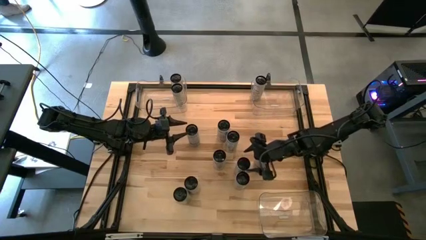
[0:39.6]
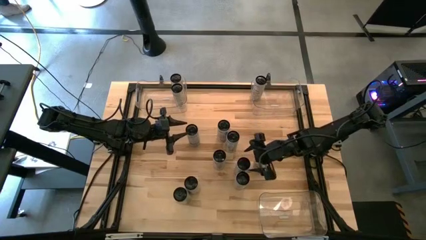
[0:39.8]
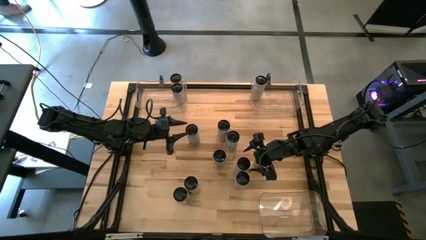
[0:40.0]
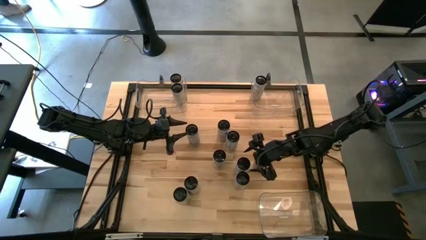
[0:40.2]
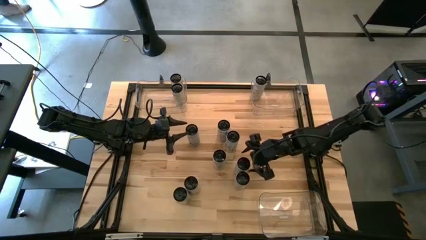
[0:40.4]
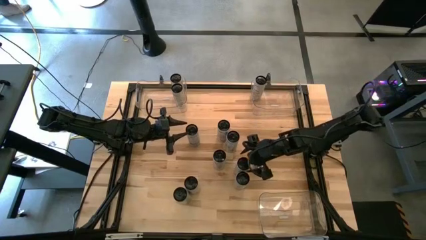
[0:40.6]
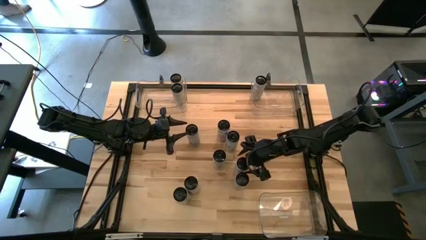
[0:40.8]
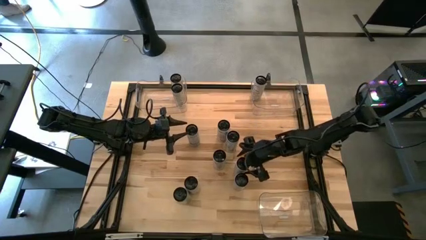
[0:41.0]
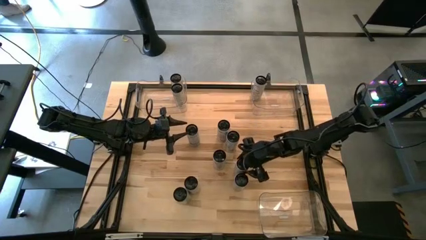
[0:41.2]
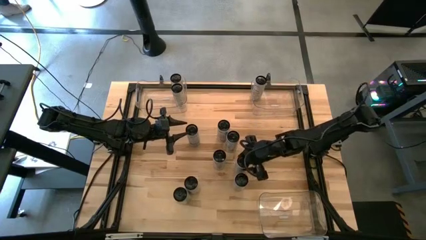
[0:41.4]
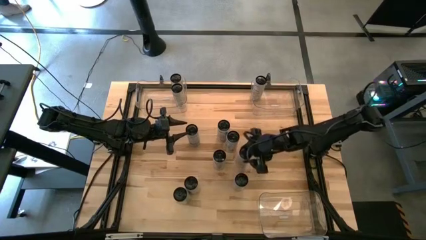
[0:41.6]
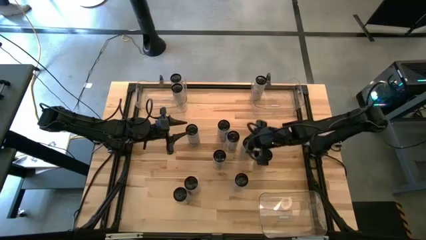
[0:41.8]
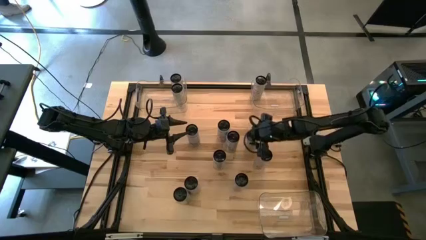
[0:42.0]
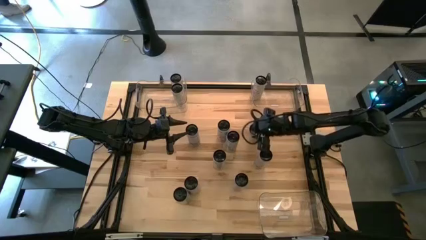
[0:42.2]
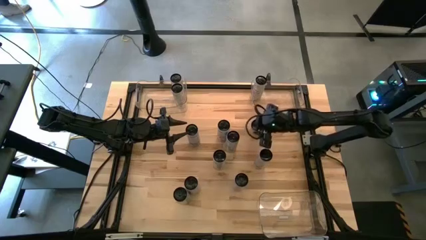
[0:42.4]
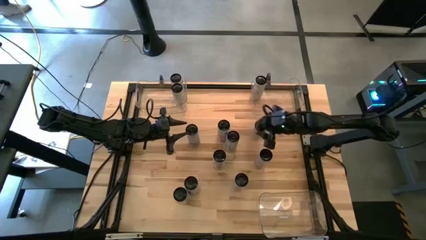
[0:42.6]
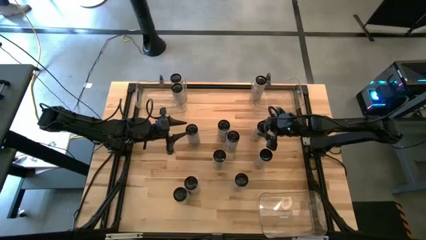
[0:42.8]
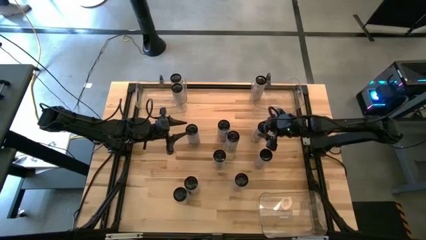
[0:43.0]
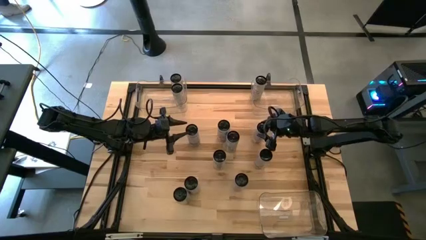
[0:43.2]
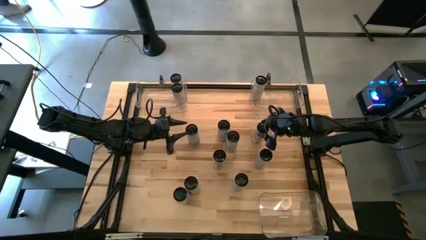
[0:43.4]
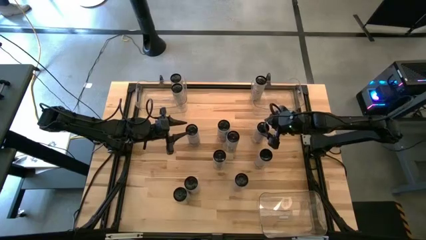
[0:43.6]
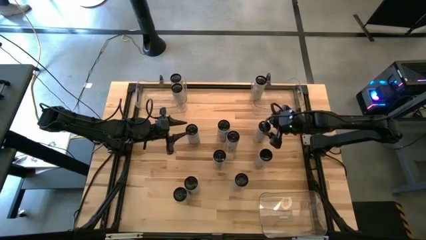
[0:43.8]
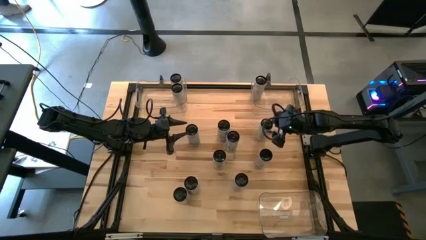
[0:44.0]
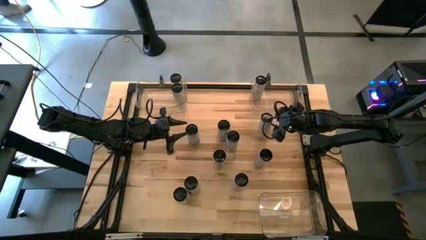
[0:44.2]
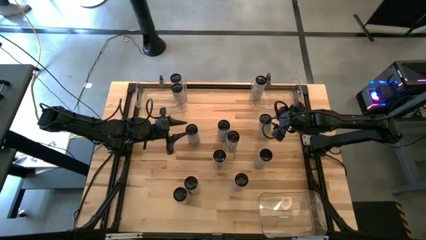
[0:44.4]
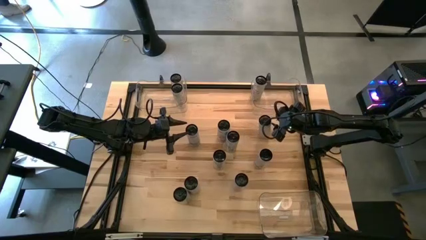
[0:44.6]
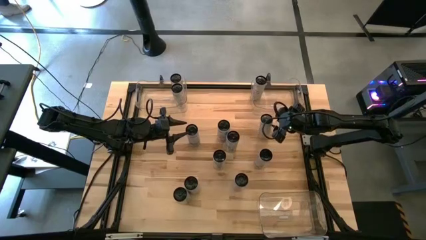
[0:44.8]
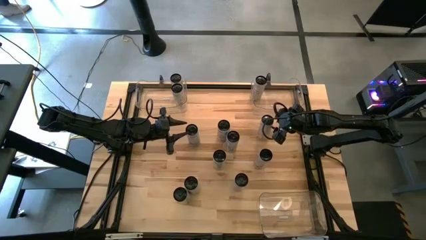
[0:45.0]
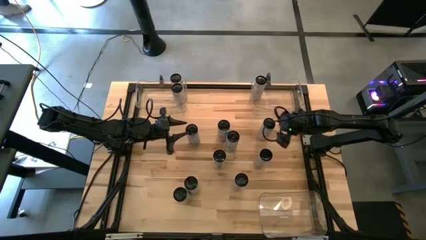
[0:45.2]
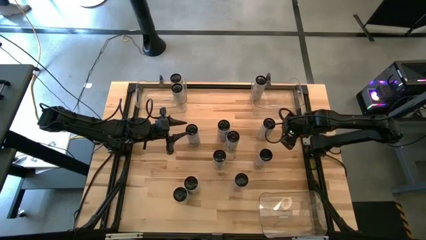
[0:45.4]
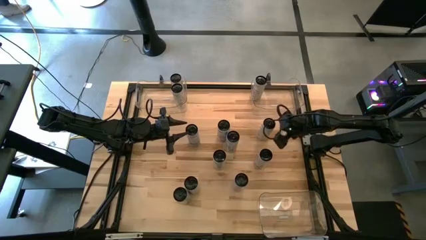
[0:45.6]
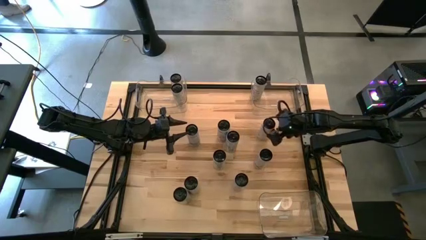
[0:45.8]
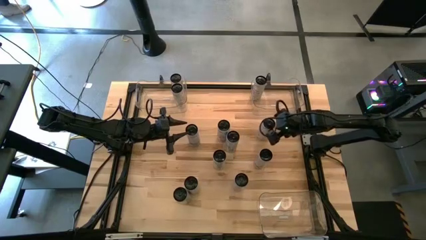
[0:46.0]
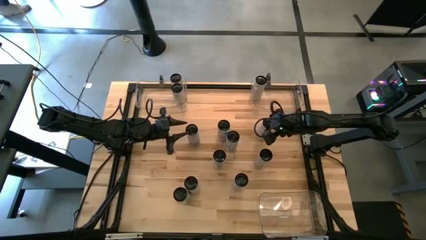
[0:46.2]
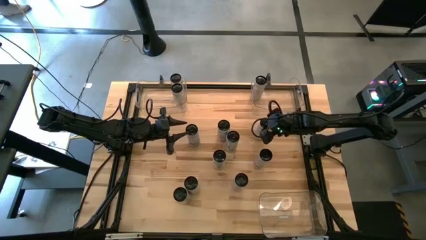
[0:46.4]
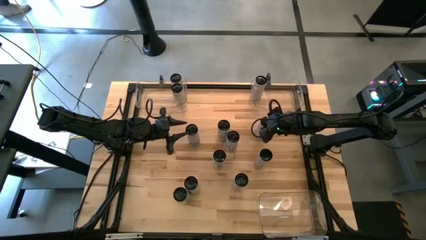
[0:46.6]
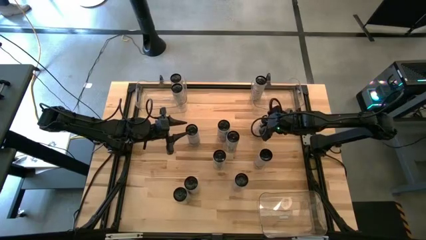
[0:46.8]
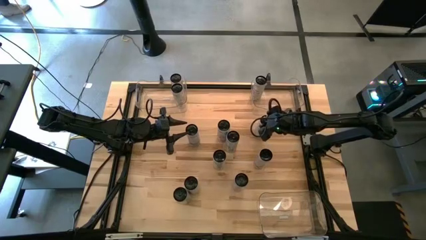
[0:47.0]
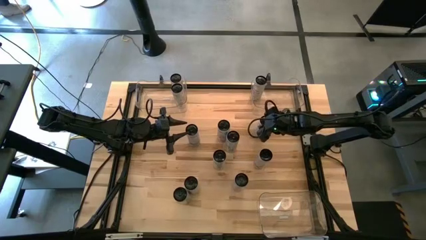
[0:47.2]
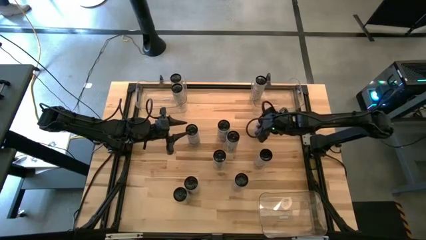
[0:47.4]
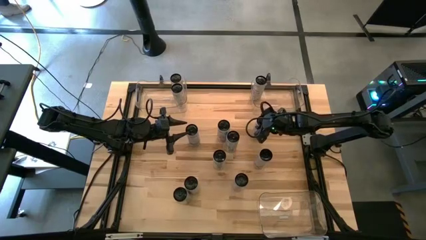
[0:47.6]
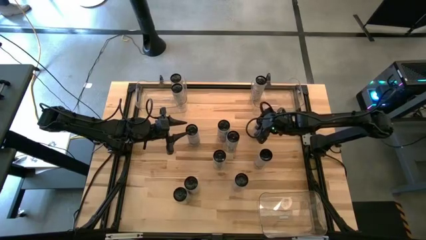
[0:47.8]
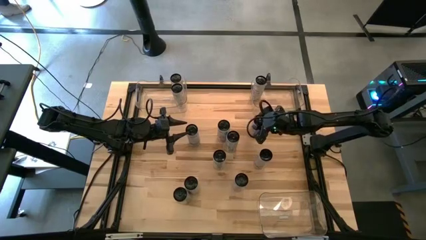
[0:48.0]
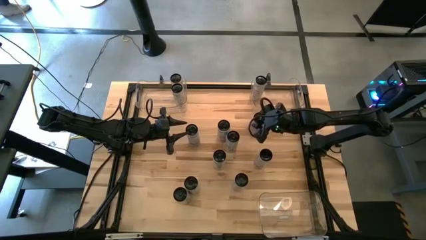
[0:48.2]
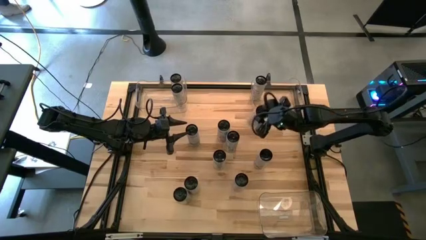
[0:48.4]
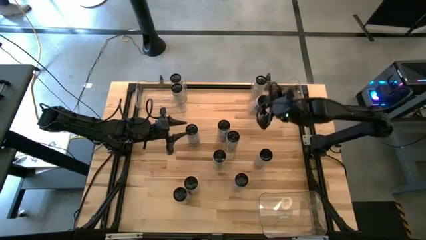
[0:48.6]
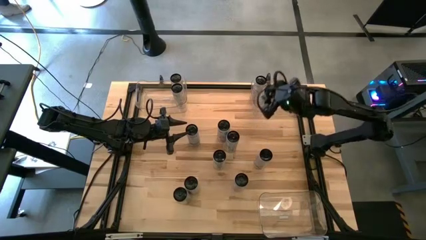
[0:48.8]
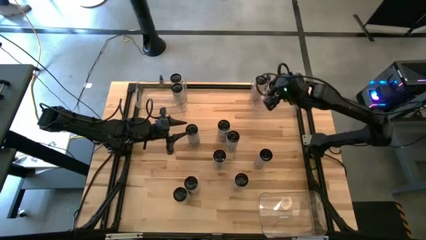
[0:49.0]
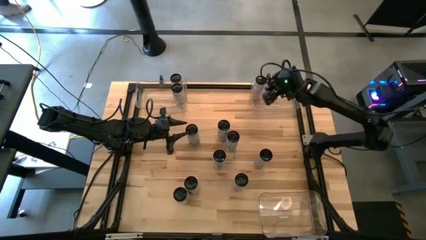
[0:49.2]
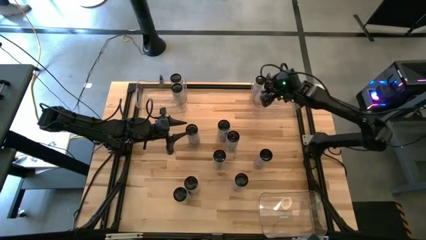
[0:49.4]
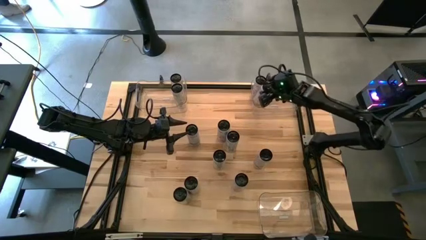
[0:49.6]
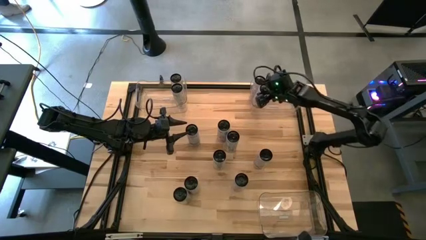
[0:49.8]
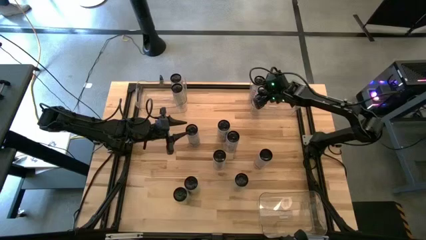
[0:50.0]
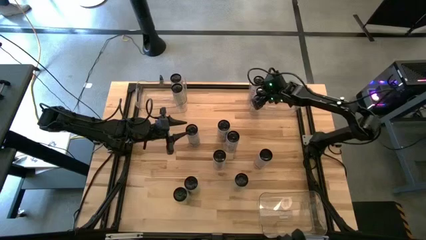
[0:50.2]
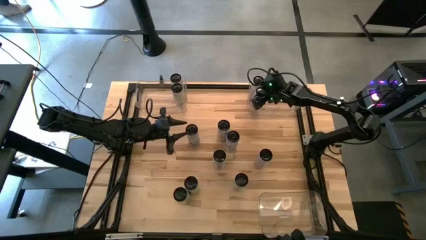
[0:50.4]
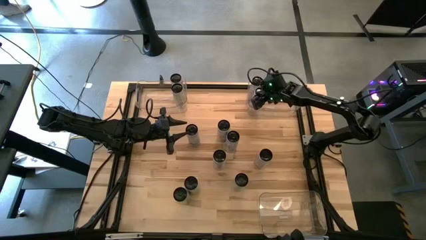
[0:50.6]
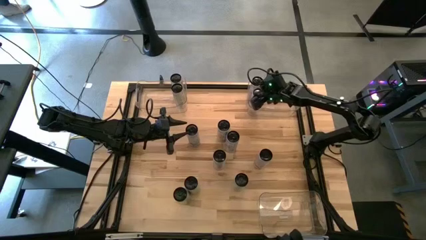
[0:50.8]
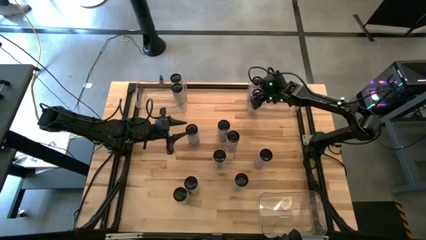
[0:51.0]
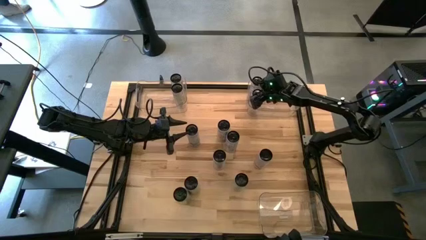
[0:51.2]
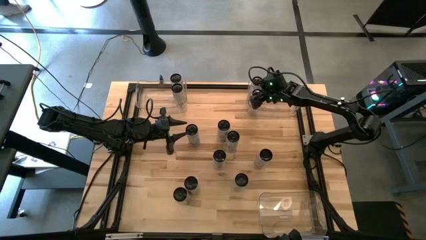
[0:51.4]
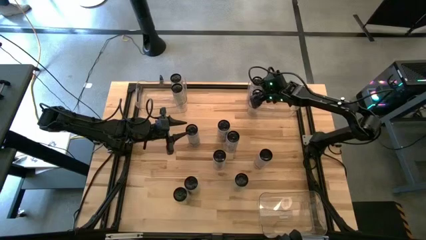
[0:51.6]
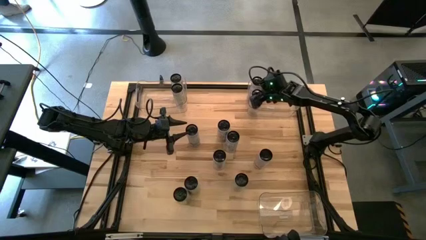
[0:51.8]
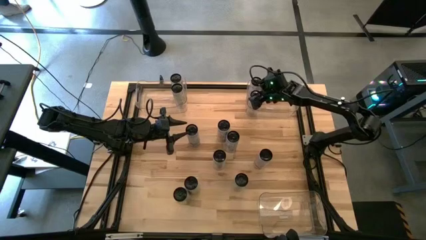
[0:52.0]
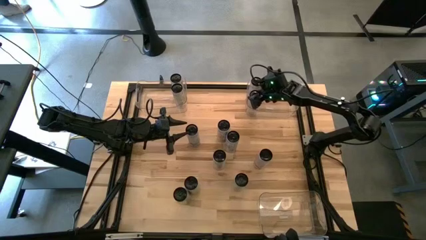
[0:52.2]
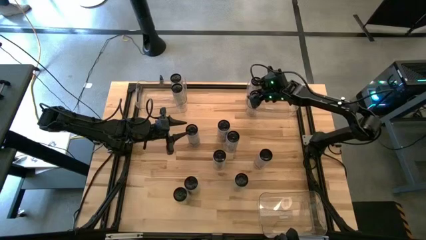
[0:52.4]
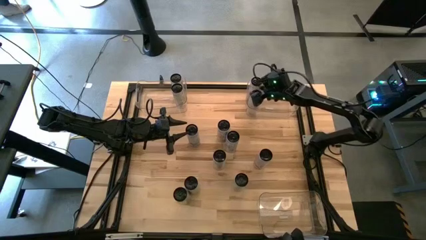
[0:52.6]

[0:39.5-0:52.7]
Task: Sort soda cans
Put the white-yellow soda cans into the top left transparent bin

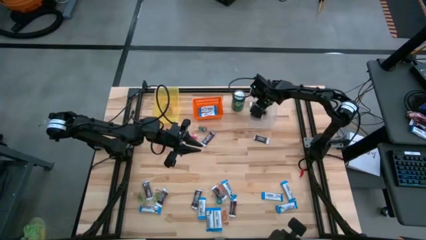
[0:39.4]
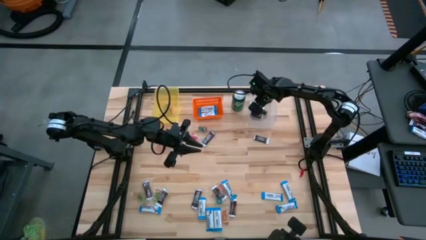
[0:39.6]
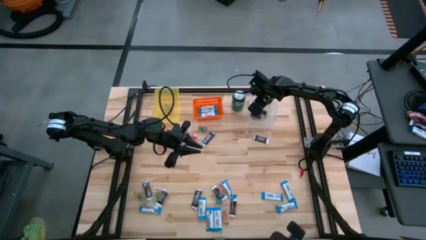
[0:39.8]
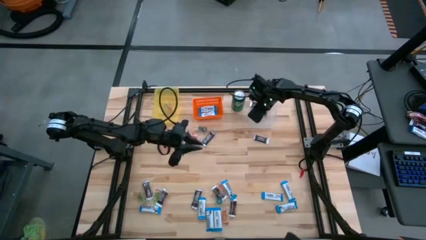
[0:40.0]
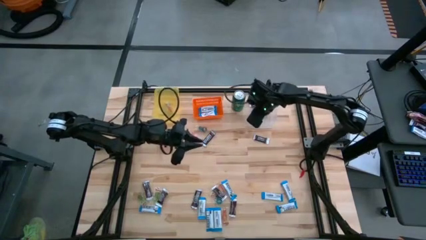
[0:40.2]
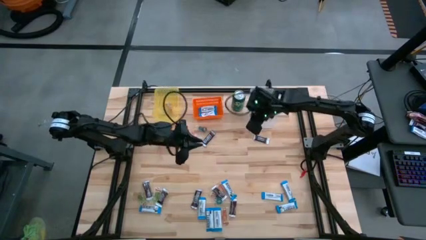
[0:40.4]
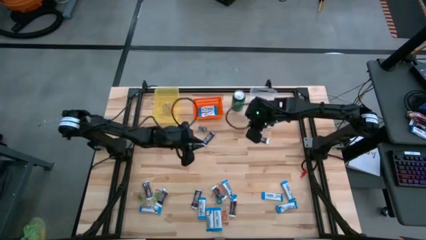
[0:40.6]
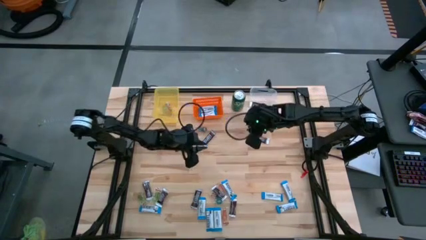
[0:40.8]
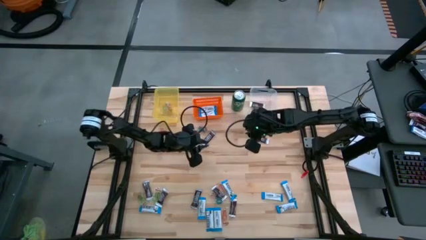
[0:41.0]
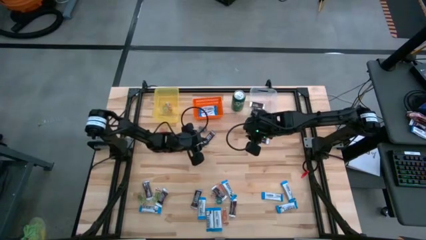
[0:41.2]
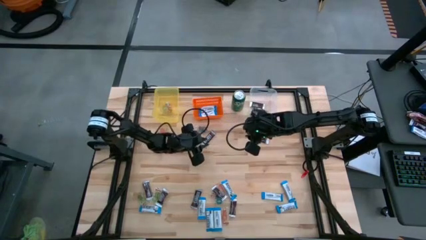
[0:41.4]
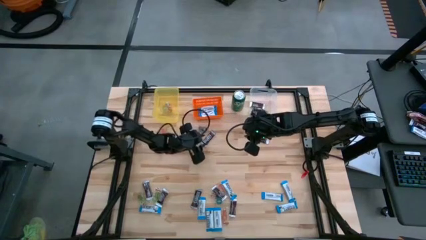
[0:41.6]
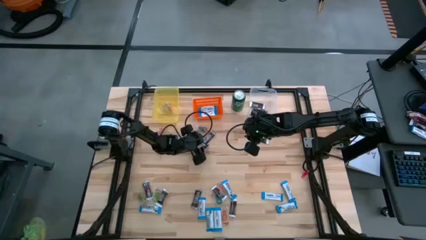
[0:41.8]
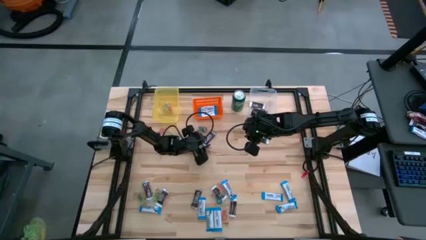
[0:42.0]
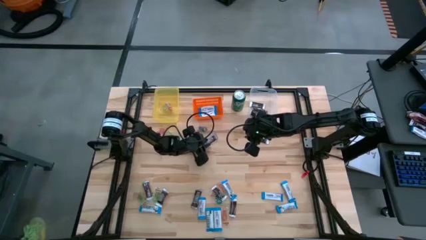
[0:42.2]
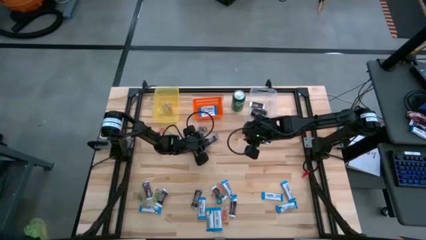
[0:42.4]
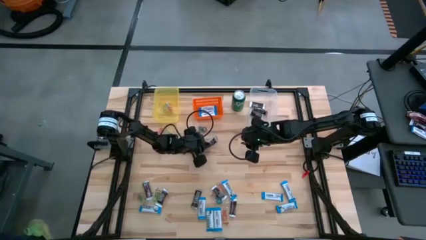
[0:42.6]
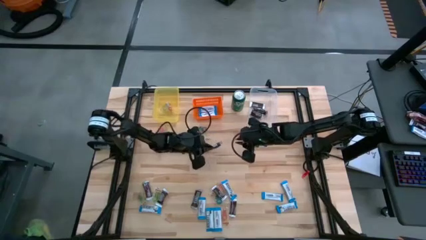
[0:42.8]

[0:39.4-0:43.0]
Task: Organize candy in baskets
Put the brown chocolate into the transparent bin
